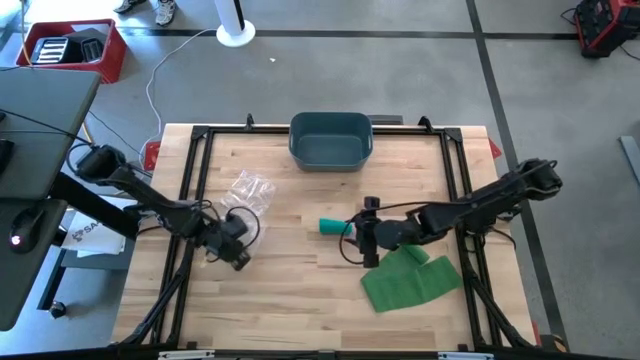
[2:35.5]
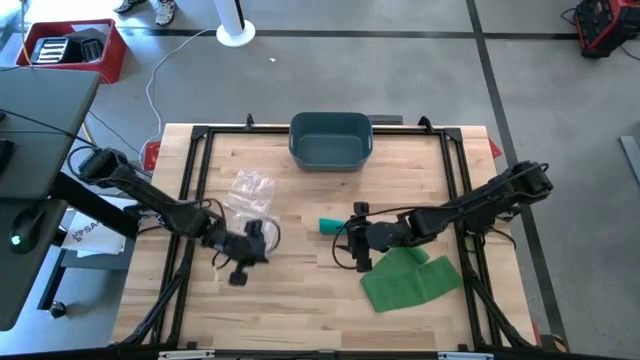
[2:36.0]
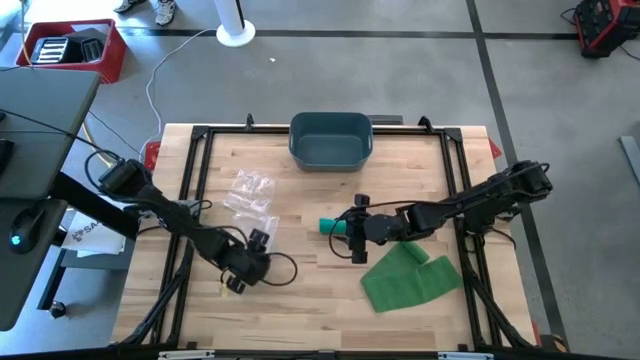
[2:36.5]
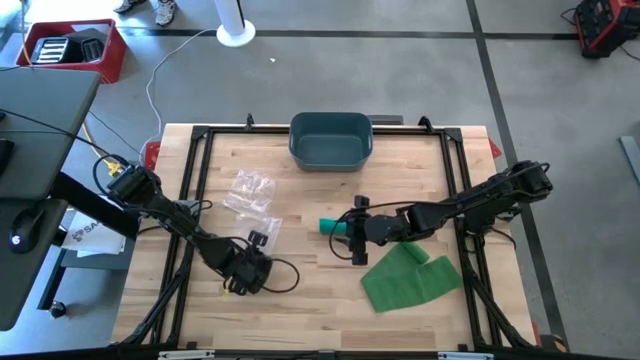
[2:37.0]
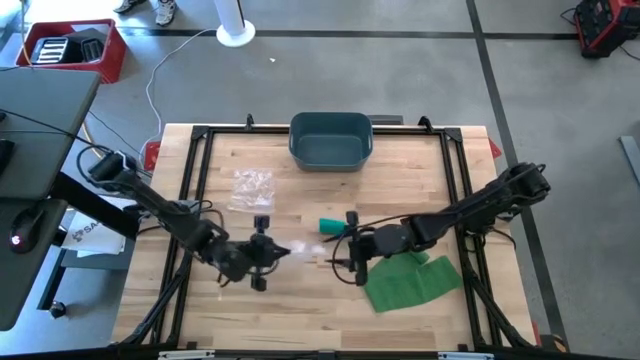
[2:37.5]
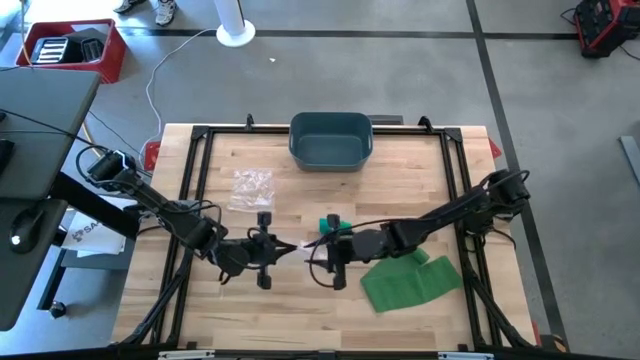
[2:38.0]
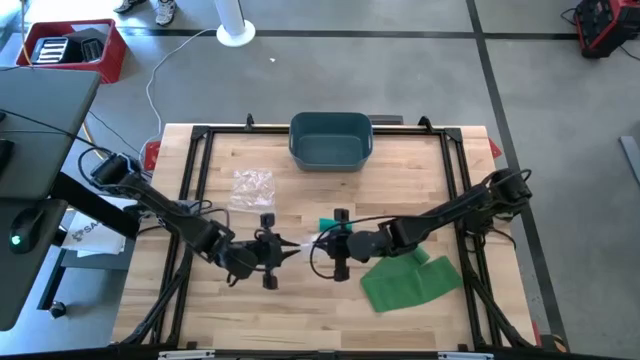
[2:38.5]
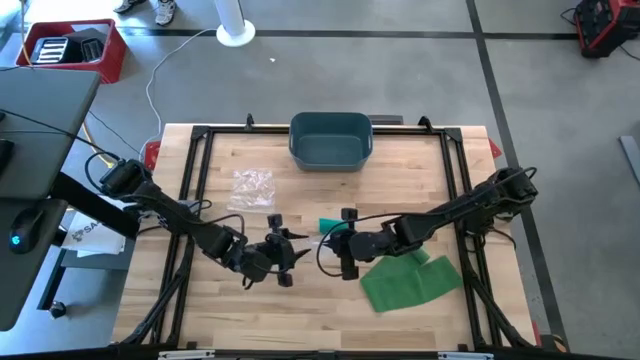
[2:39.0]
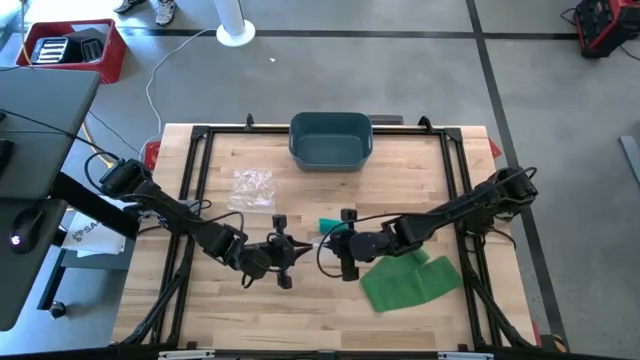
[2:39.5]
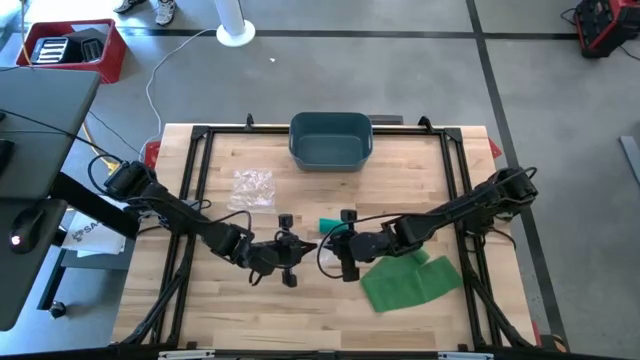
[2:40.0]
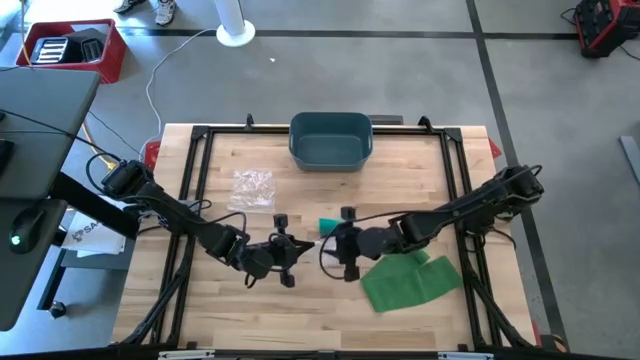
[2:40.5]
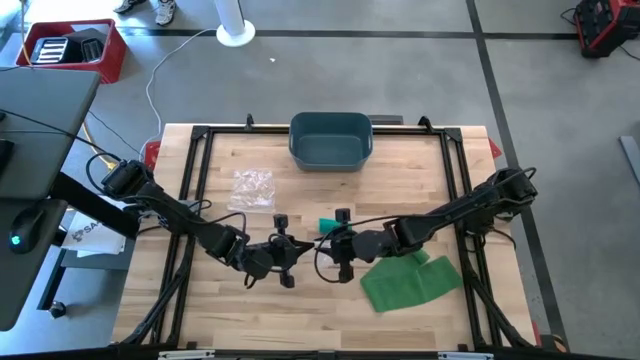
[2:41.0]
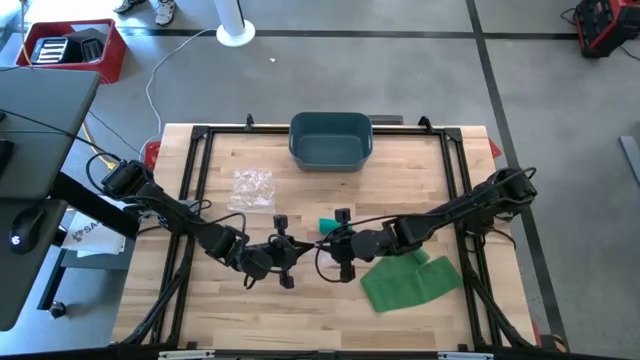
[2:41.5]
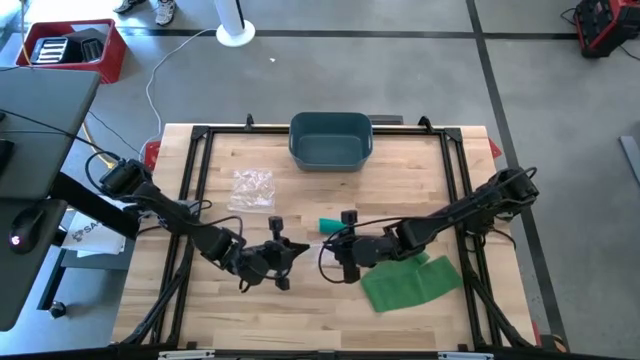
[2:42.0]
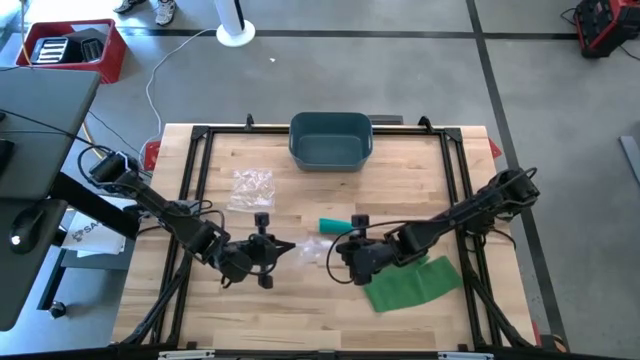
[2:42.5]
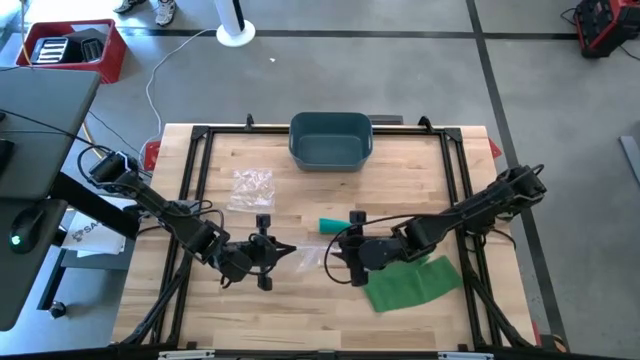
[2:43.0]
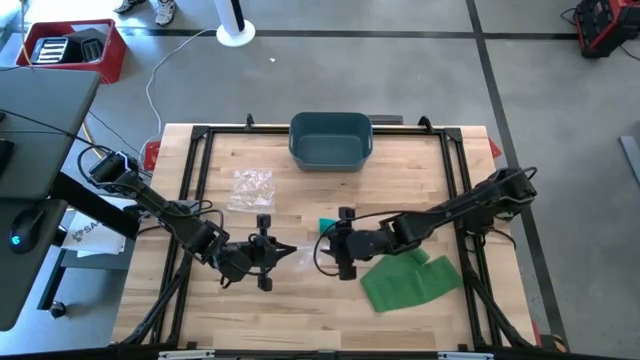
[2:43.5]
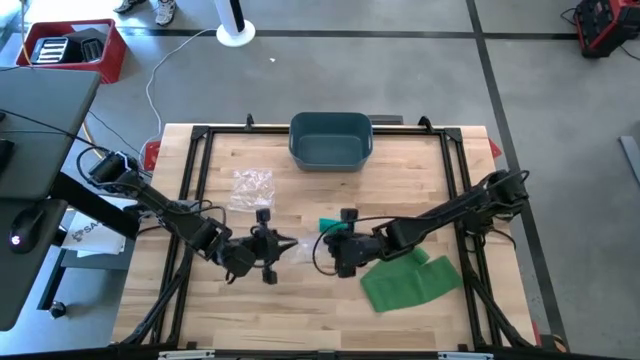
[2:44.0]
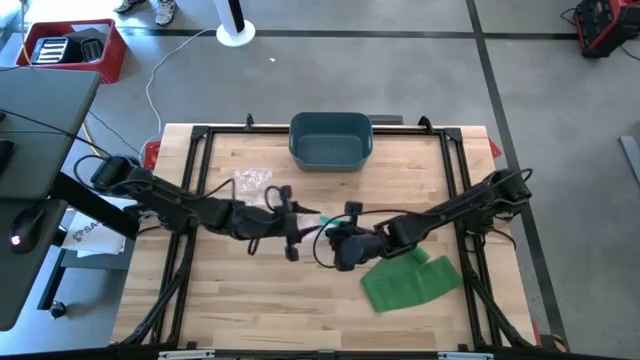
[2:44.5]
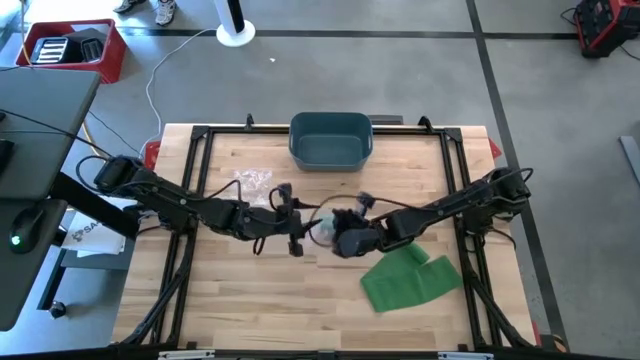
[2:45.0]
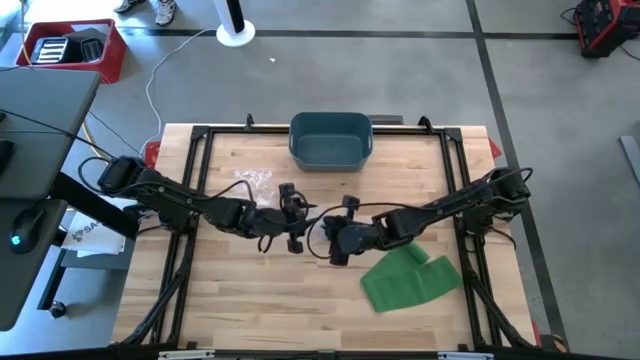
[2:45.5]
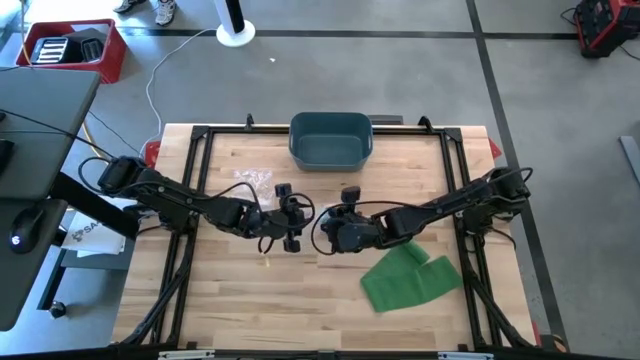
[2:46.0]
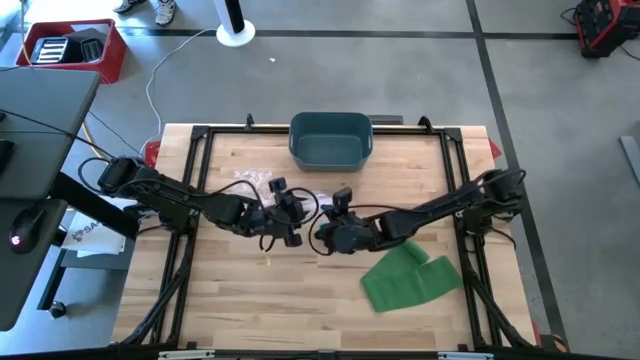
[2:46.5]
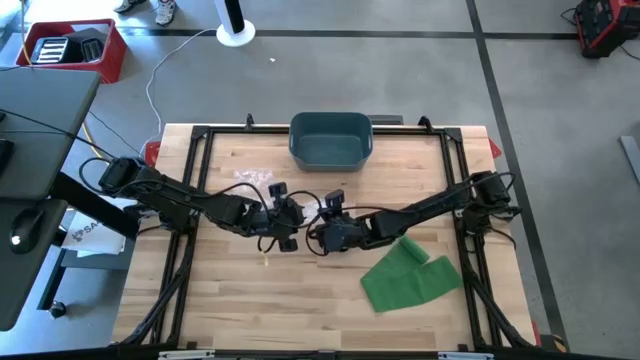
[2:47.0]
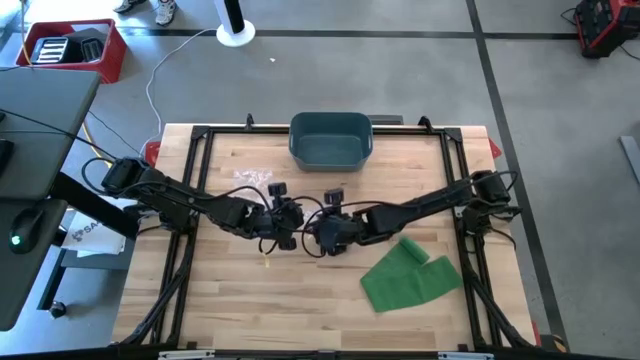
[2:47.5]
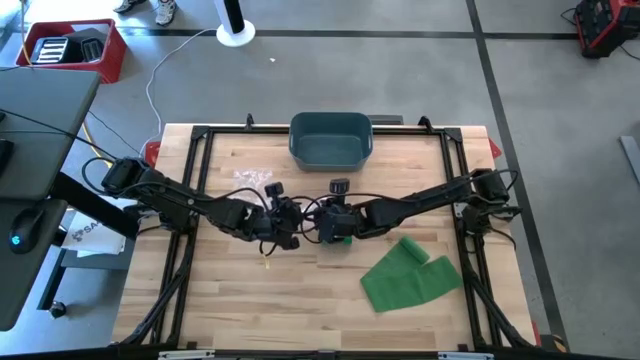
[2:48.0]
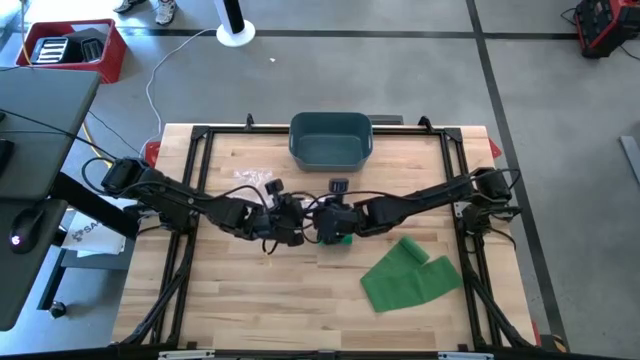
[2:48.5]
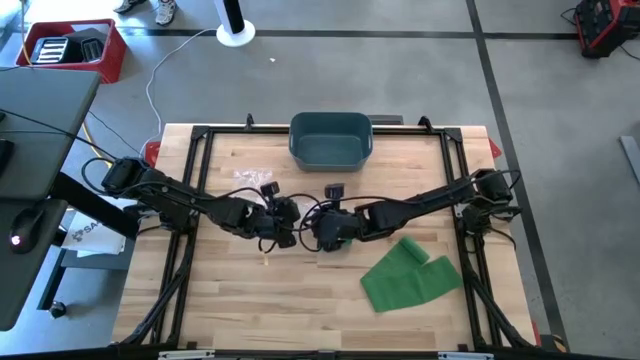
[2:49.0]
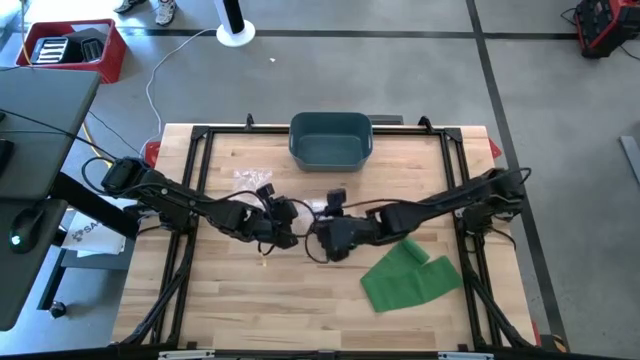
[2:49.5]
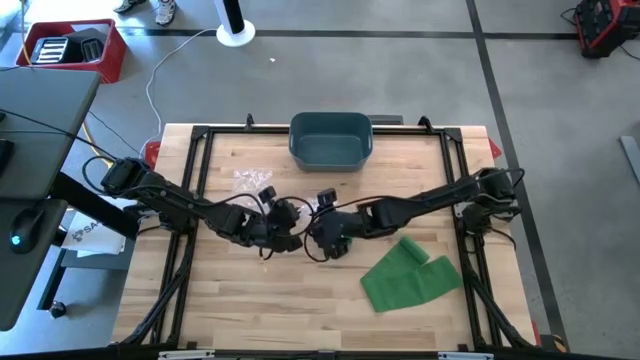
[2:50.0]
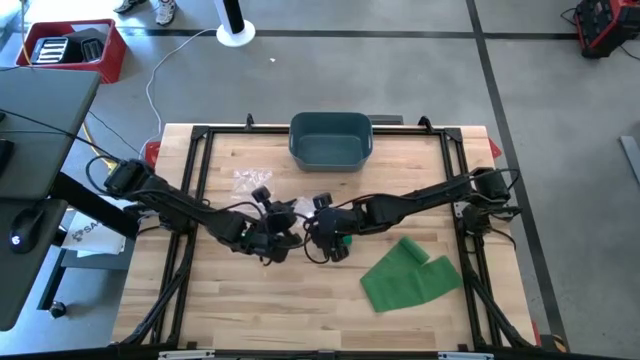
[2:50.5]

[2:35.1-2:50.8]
Task: Roll bandage
Open the bottom transparent zip bag

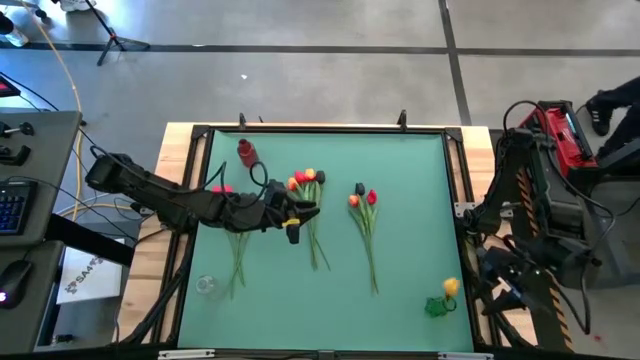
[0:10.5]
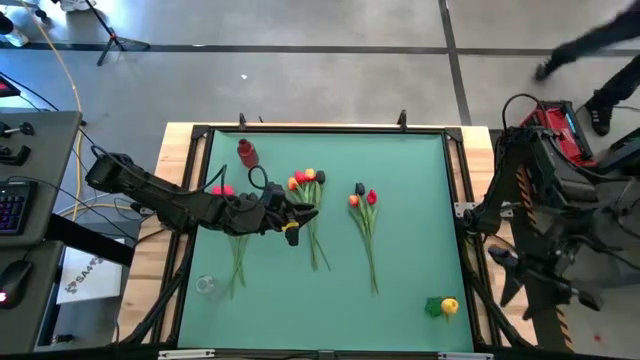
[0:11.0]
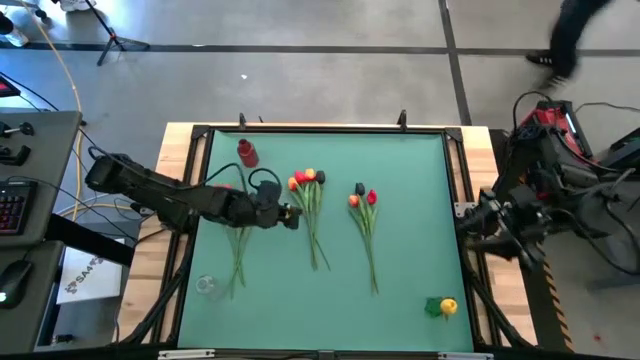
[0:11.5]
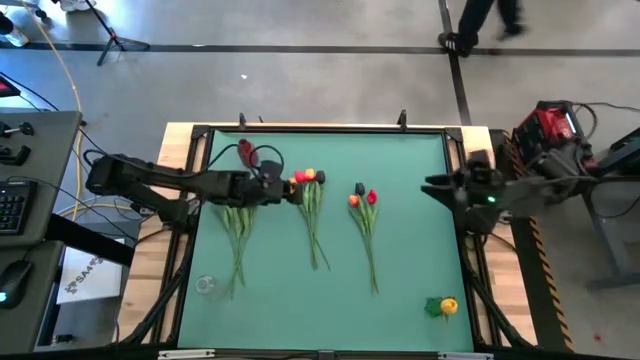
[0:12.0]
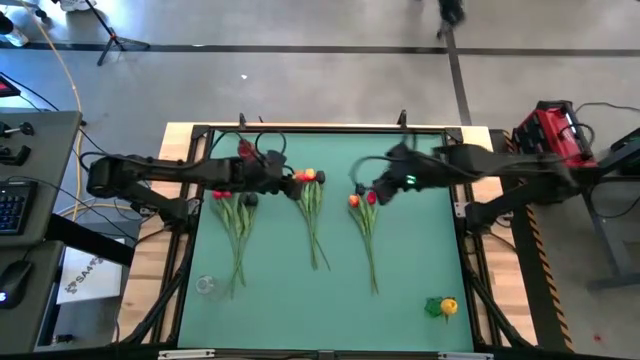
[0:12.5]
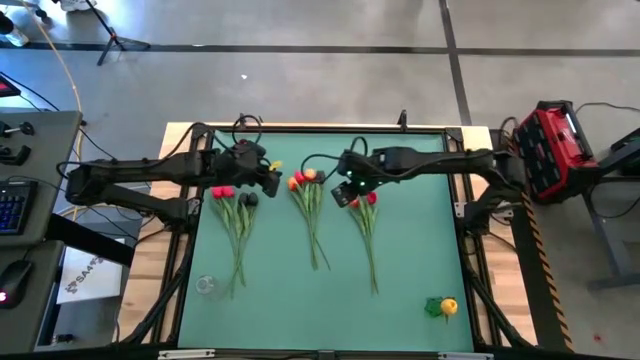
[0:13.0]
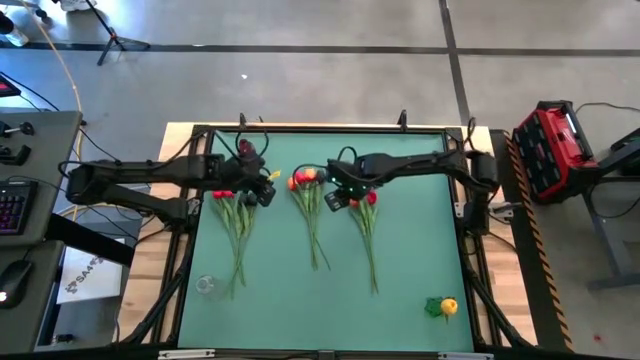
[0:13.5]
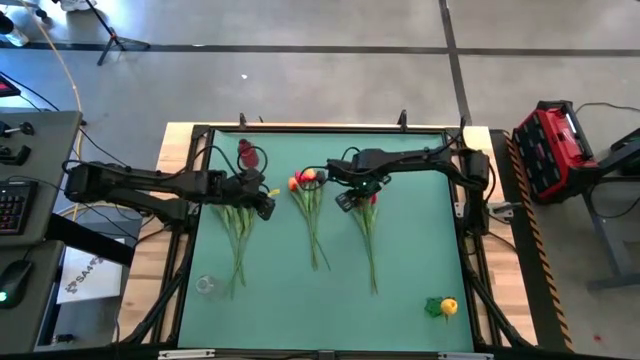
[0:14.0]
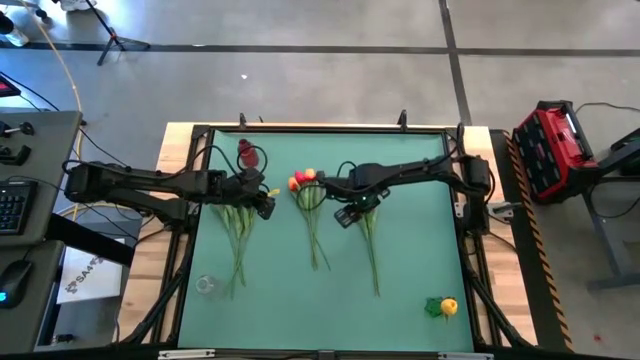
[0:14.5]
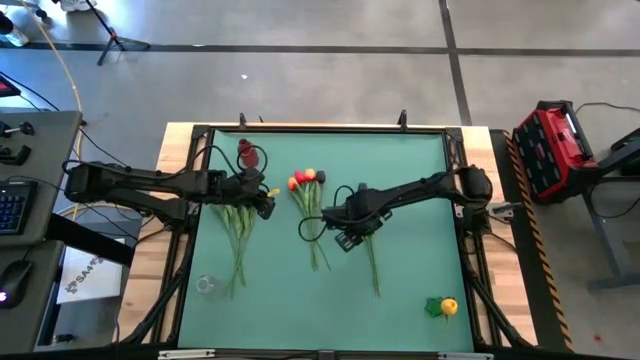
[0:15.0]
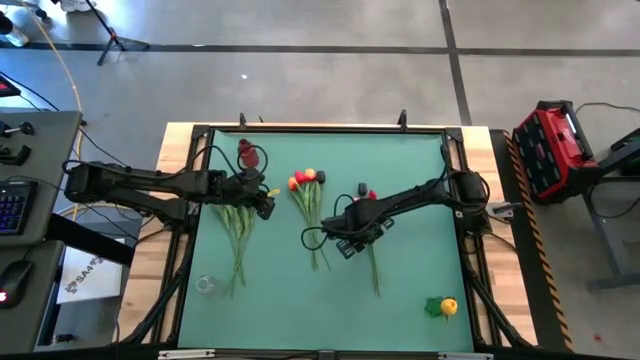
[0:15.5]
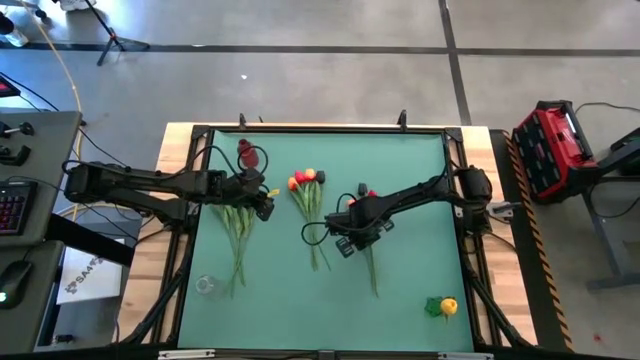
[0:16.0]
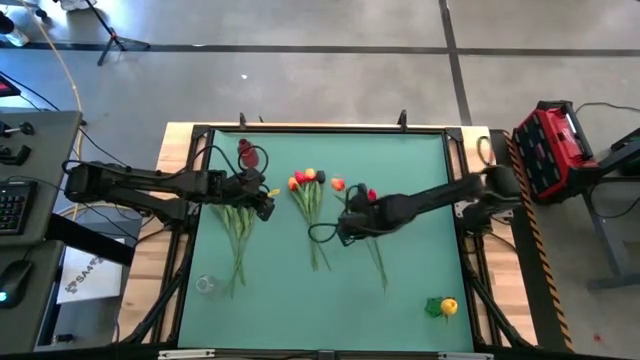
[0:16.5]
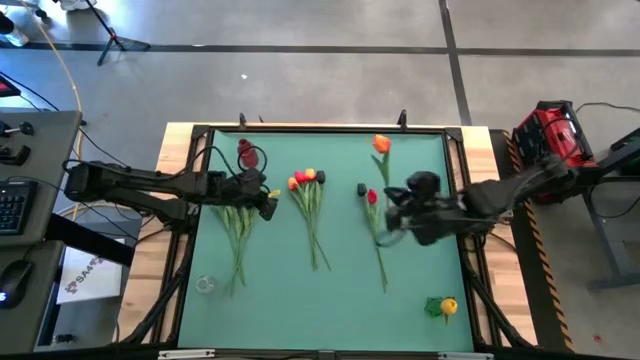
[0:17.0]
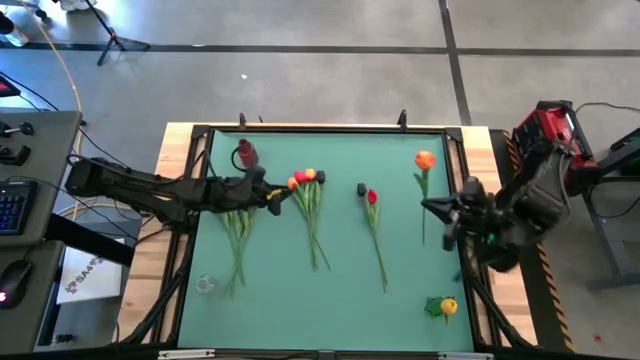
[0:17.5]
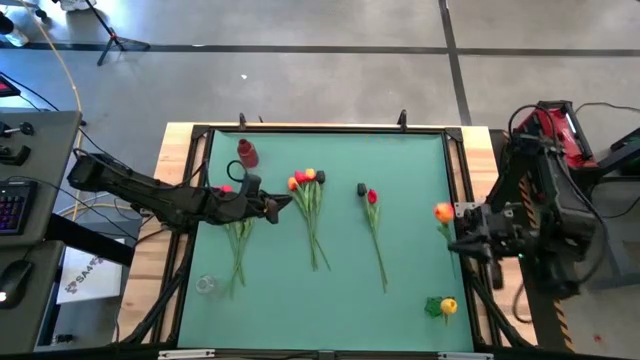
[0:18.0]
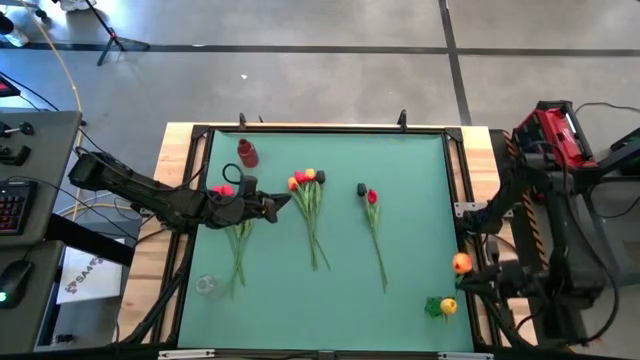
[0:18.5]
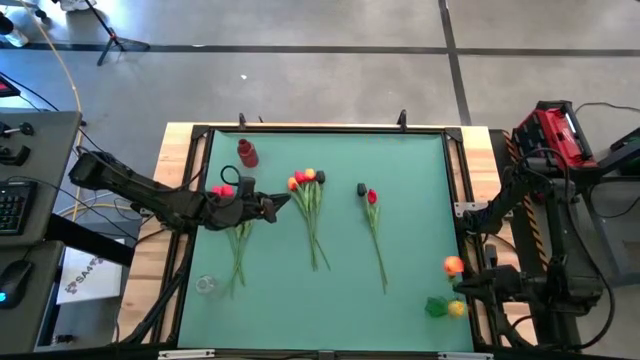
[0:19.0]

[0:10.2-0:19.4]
Task: Sort flowers into vase by color
Put the orange flower into the green vase
